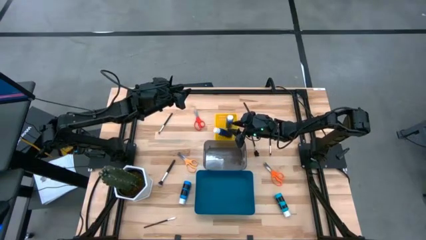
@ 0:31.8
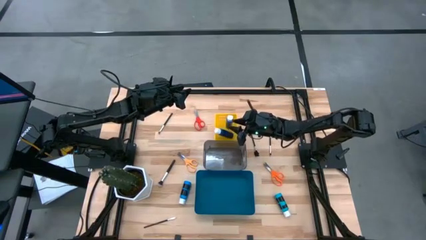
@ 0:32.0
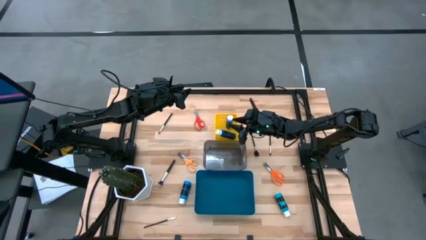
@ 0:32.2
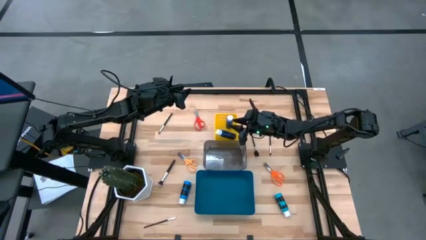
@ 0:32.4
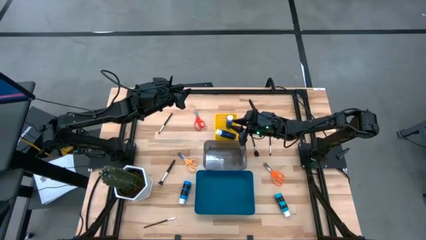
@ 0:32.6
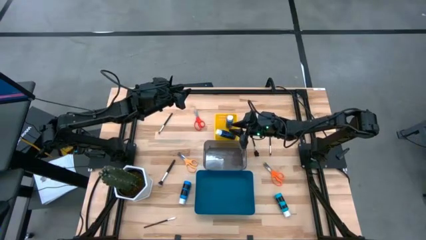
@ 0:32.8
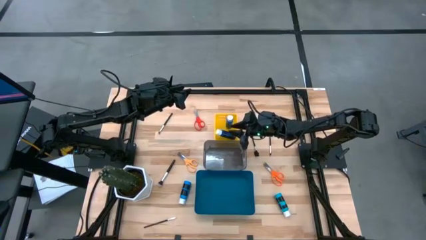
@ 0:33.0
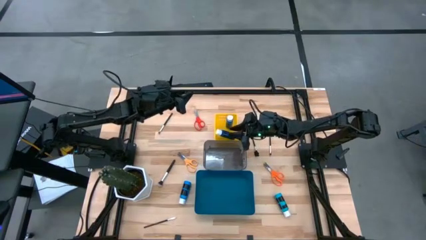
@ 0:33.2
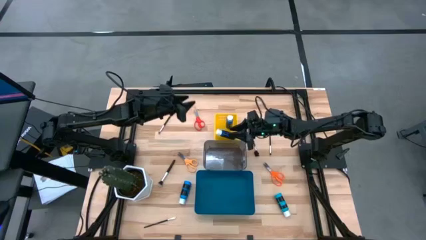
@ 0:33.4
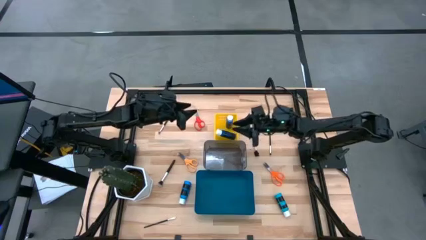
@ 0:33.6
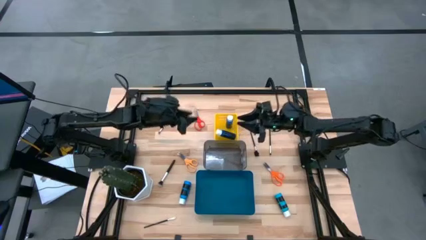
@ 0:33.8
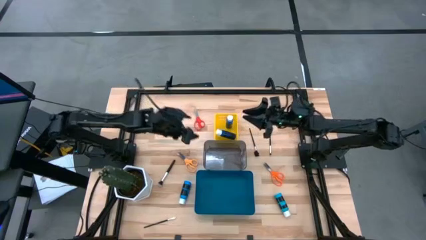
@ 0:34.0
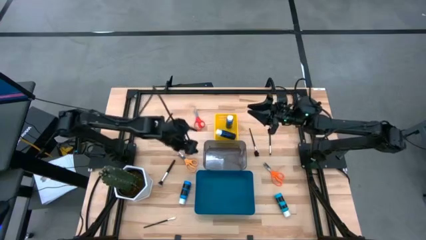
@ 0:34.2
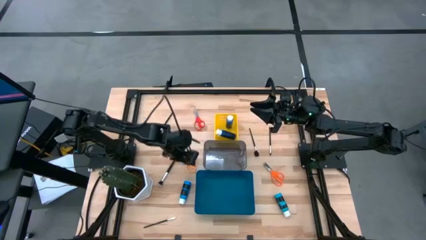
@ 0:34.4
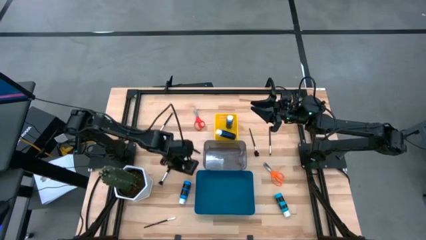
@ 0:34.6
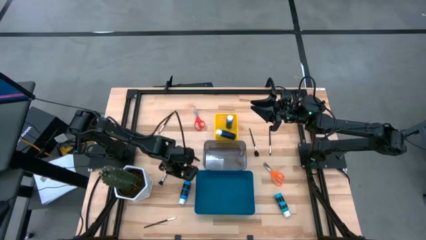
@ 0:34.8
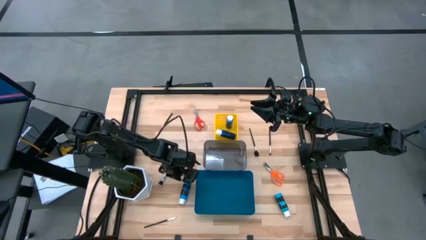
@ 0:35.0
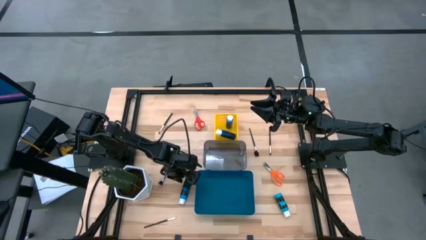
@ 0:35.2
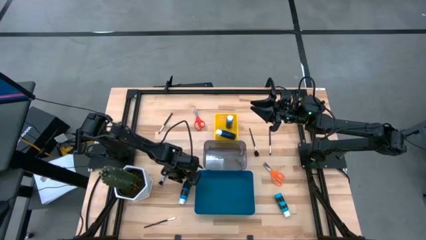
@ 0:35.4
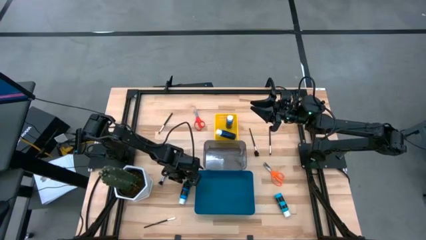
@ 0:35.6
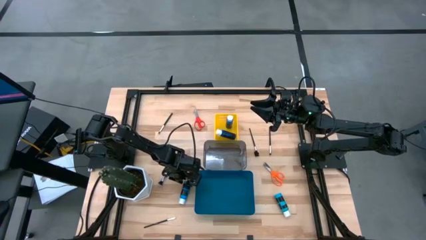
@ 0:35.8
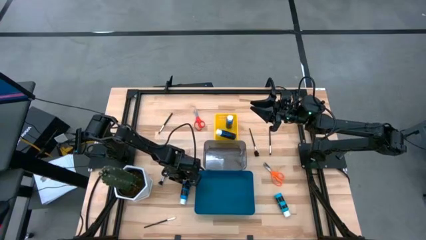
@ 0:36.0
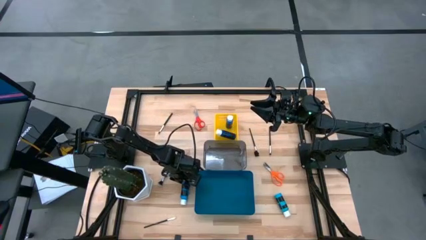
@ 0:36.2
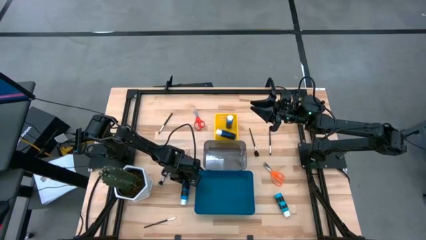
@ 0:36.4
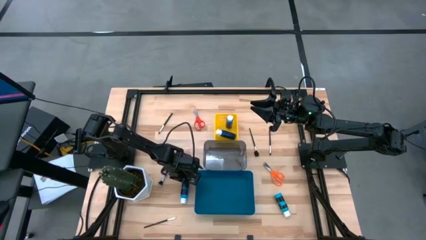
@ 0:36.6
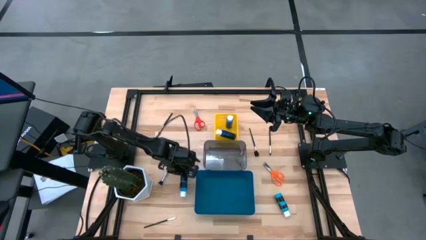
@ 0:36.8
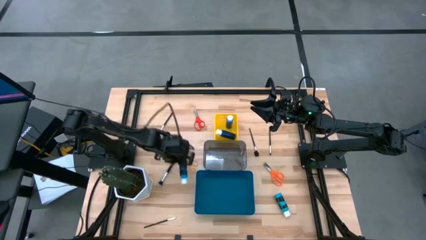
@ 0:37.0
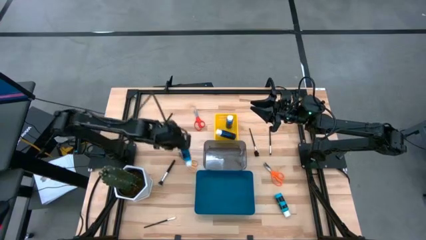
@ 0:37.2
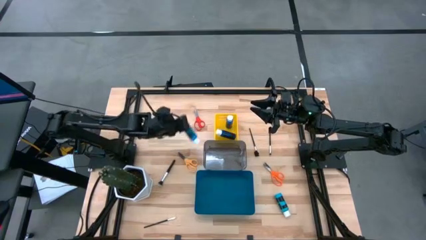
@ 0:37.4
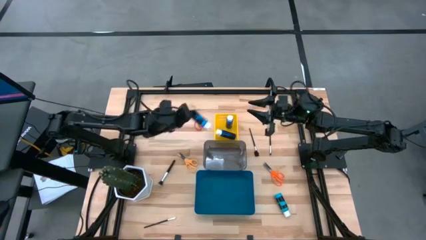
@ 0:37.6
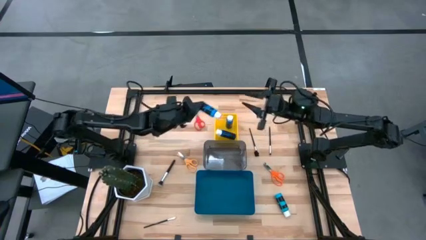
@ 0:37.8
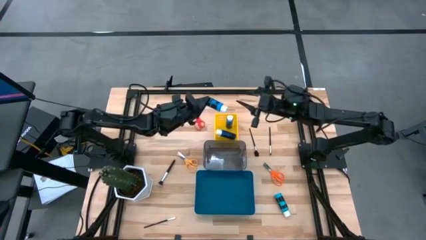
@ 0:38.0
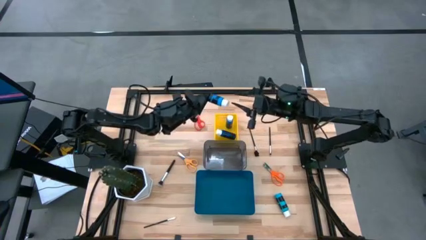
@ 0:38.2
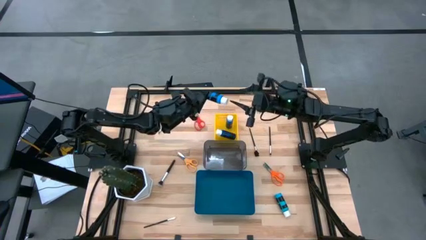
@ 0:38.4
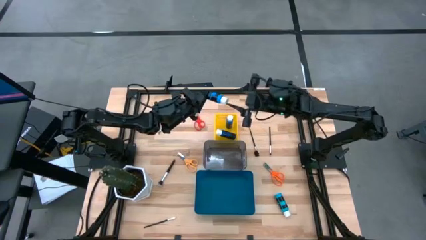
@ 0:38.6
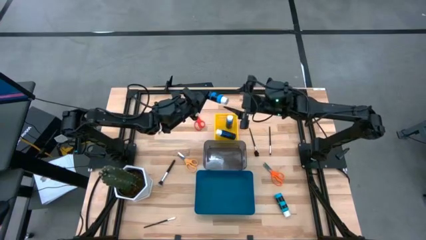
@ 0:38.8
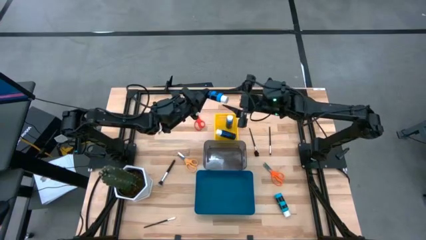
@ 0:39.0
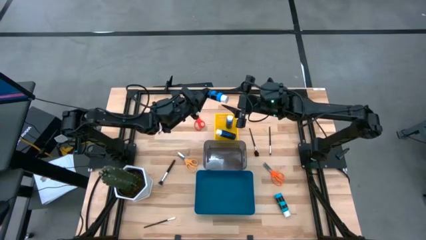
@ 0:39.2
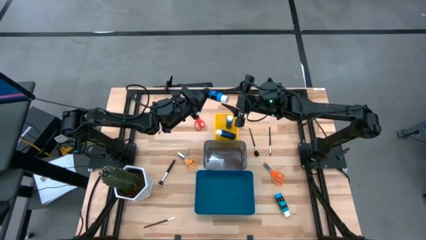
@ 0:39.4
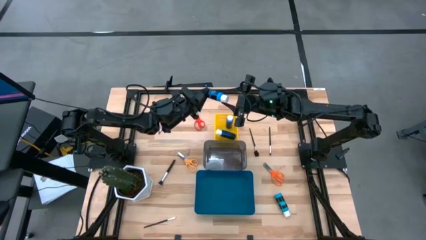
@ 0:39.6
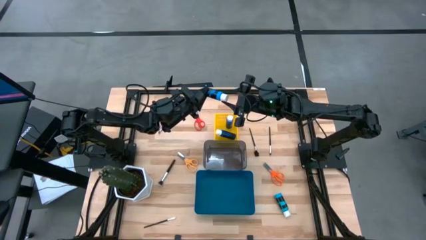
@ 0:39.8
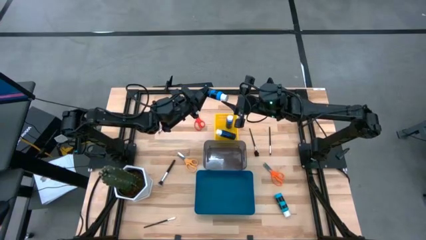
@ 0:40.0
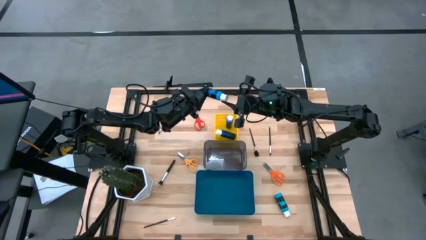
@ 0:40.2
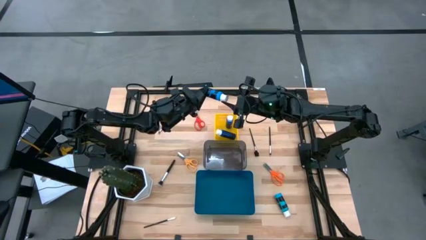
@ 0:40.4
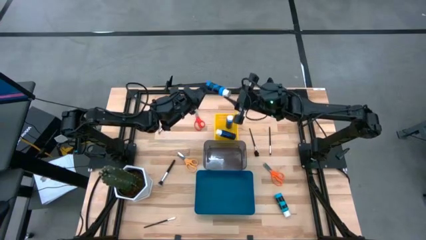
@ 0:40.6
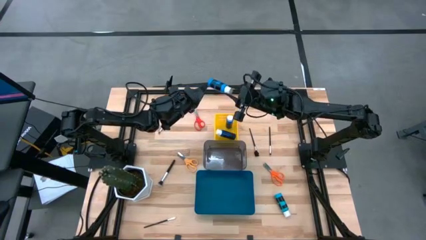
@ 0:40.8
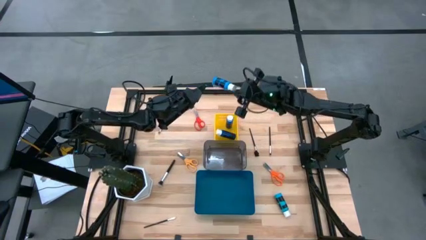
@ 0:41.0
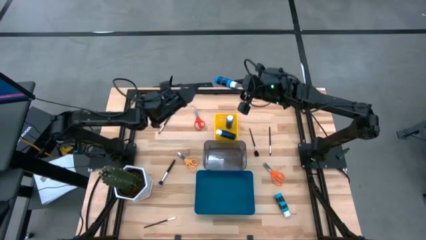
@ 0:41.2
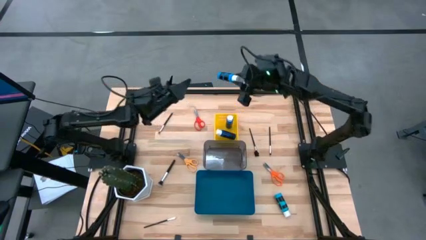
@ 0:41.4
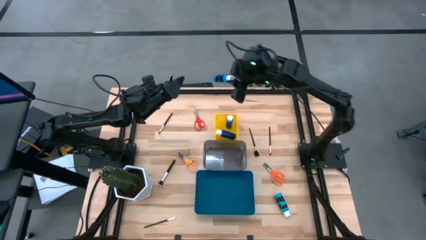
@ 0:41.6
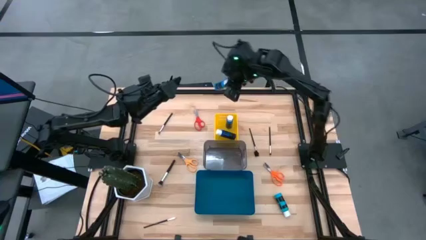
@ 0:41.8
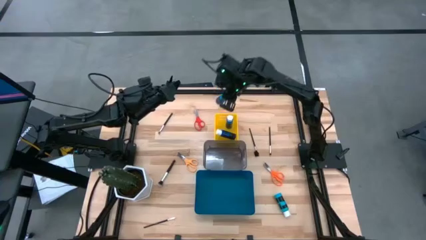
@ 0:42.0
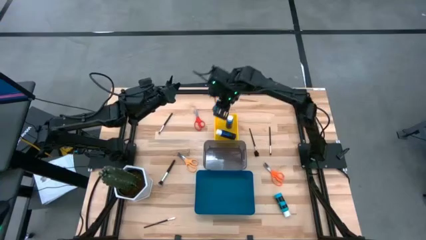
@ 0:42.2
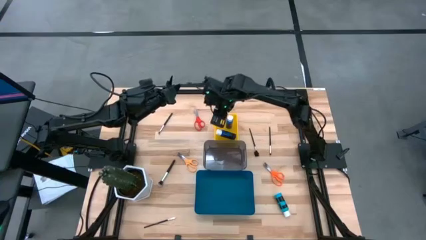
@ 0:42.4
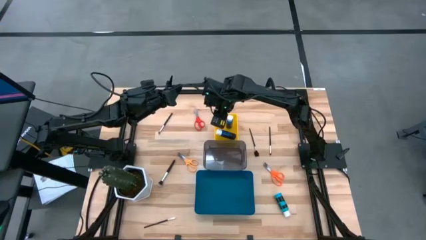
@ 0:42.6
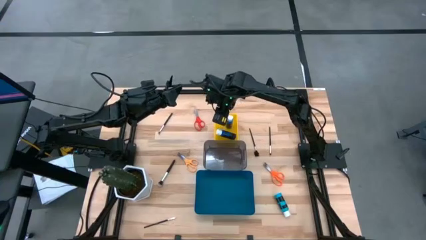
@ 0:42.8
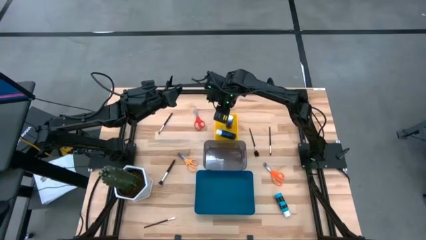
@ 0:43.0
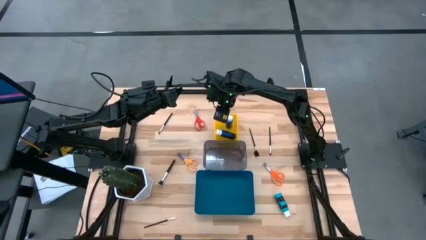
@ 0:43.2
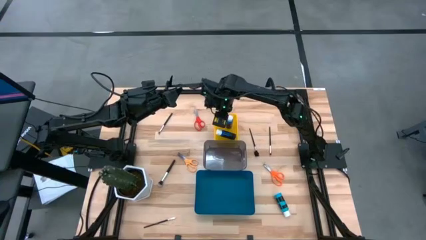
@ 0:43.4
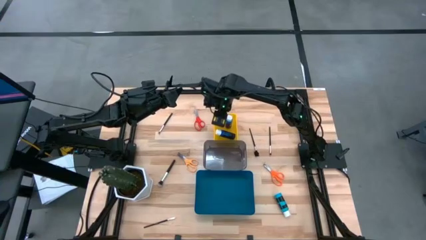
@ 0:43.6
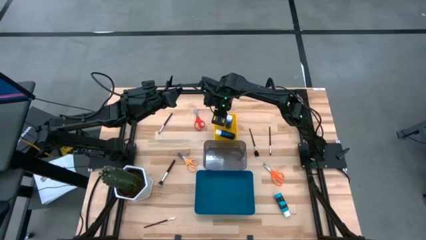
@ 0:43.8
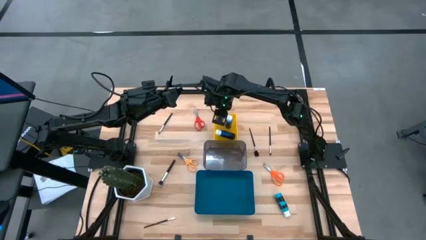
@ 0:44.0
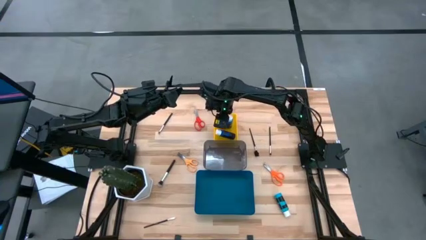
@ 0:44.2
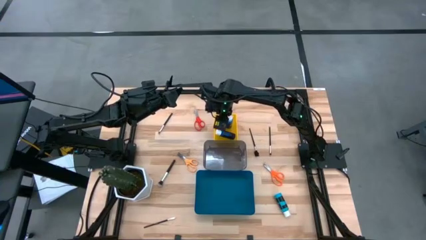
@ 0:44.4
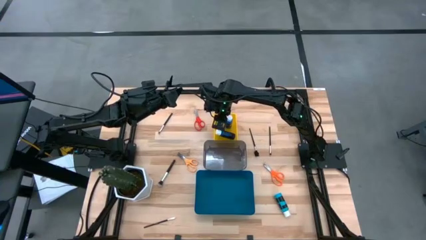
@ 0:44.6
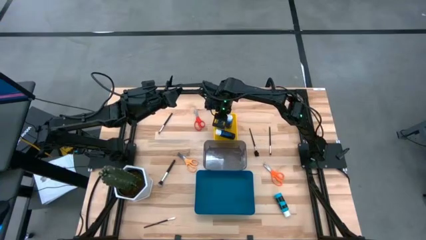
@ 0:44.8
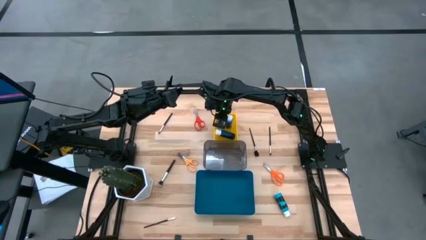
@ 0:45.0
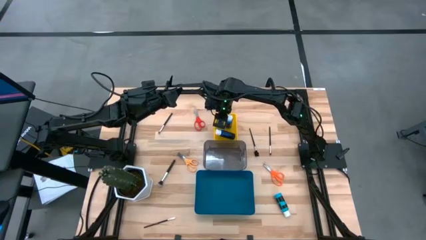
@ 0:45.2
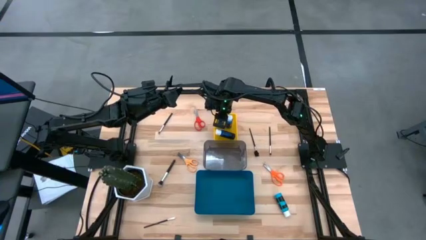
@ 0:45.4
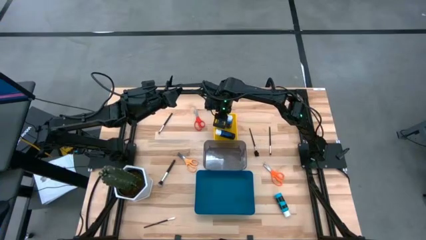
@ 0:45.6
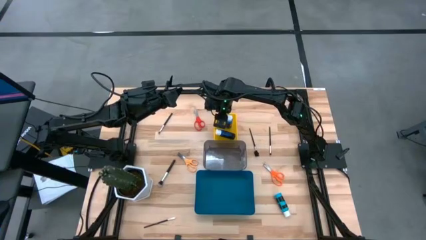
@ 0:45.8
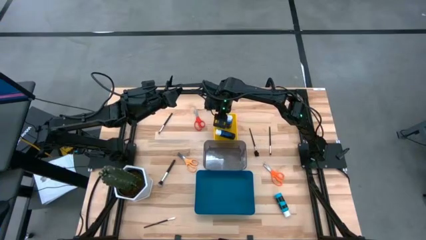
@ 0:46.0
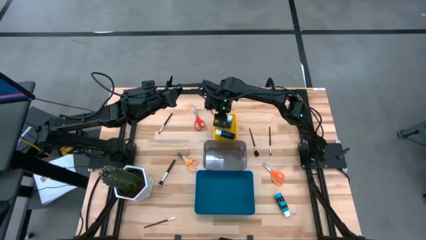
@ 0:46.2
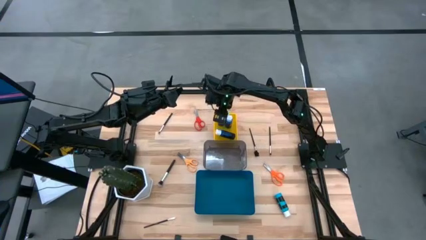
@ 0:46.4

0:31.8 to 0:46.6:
Task: Pick & Place Paint Supplies
Put the blue paint bottle into the yellow bin
